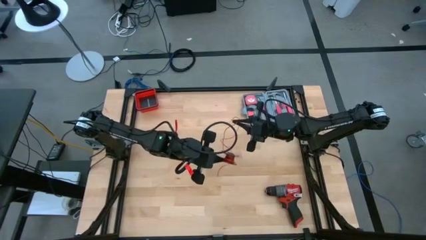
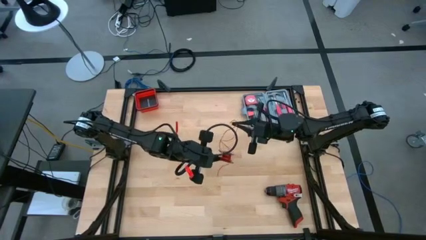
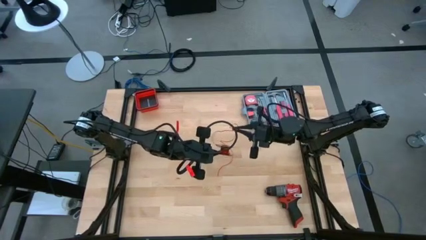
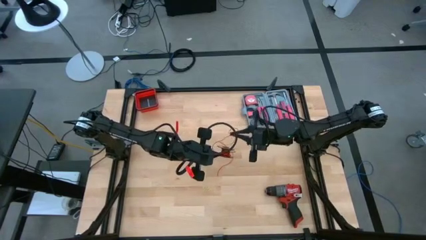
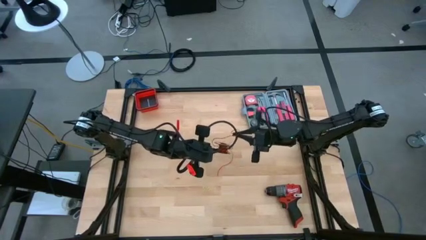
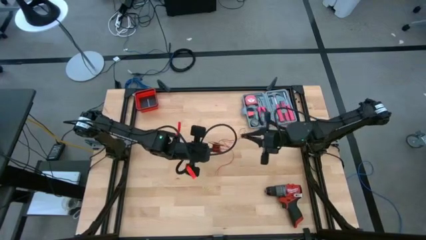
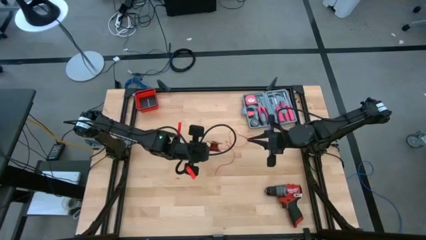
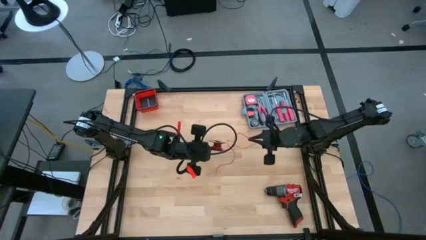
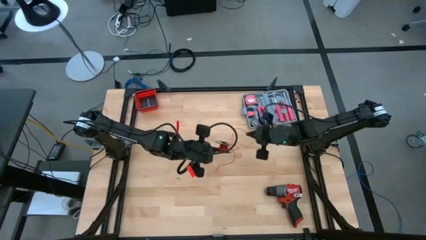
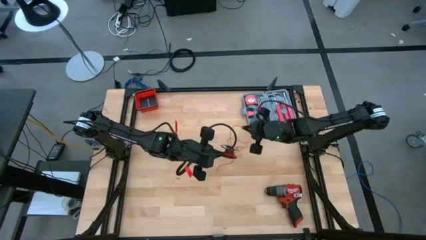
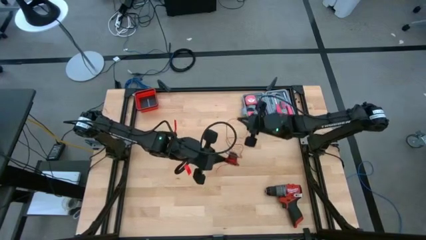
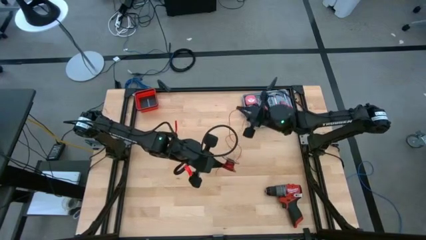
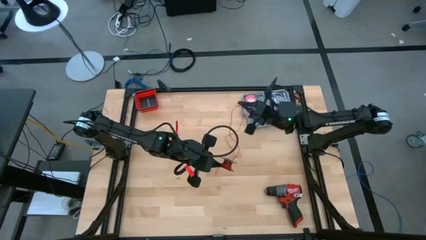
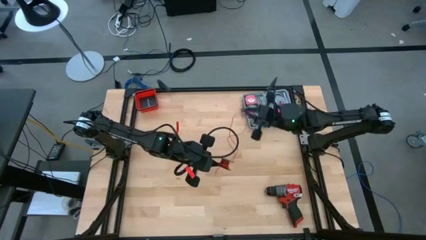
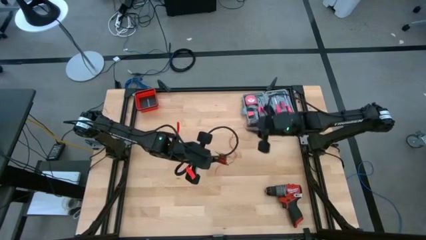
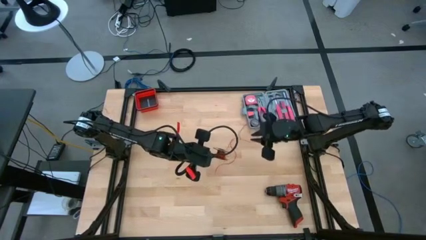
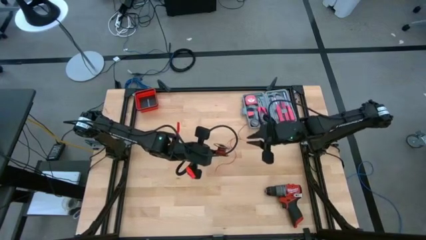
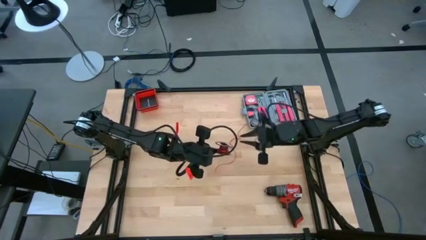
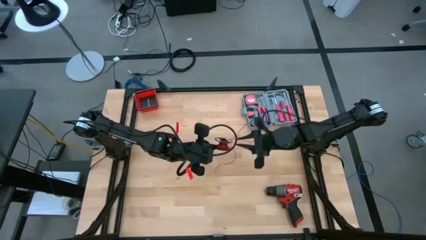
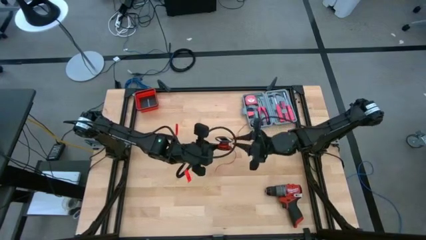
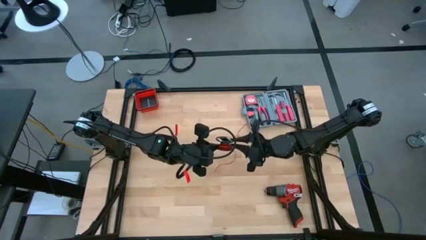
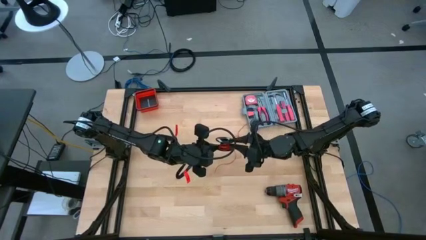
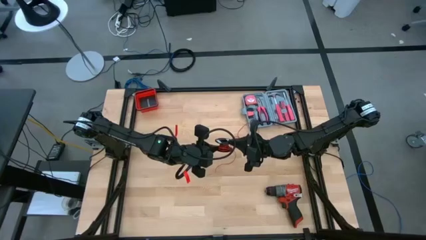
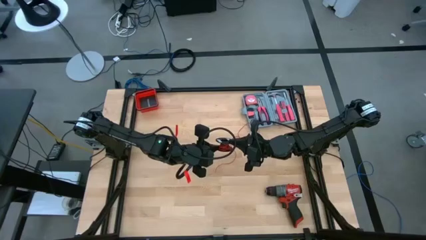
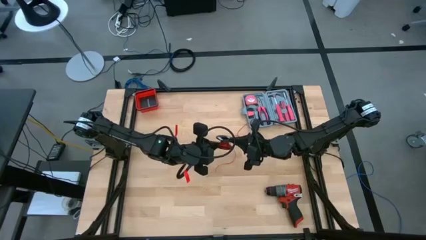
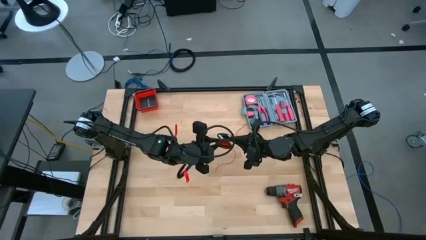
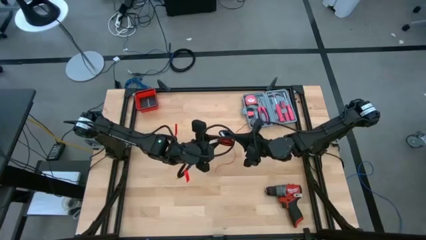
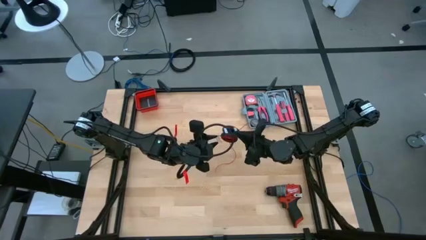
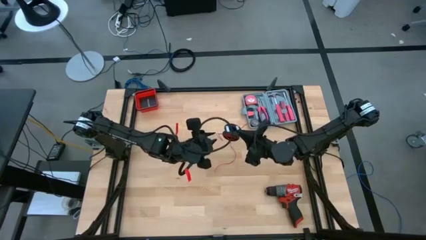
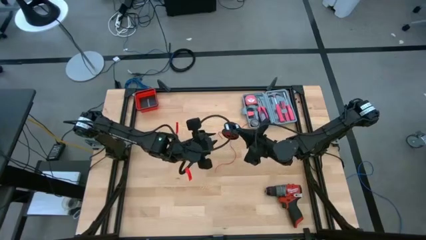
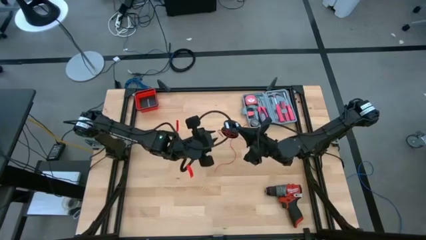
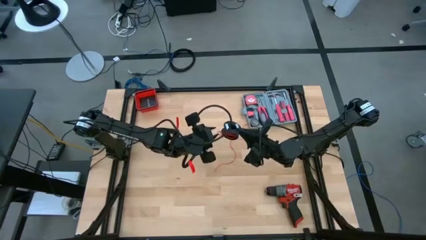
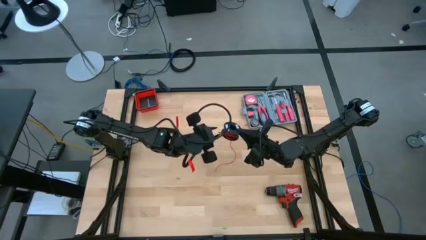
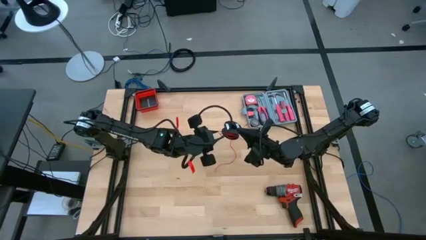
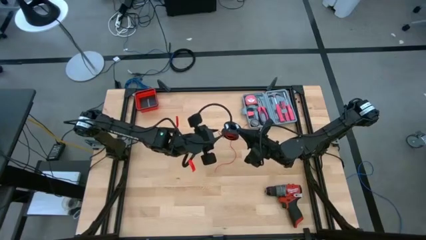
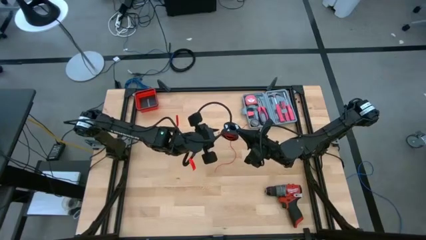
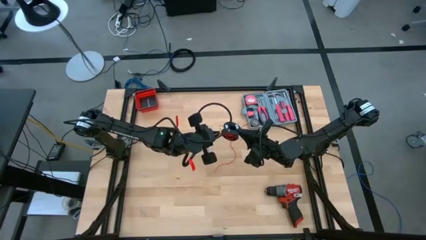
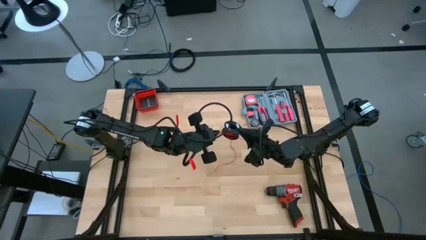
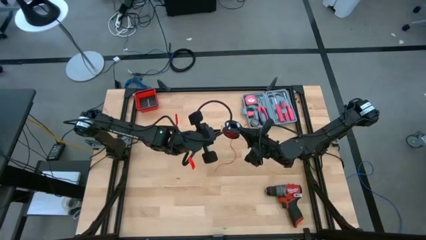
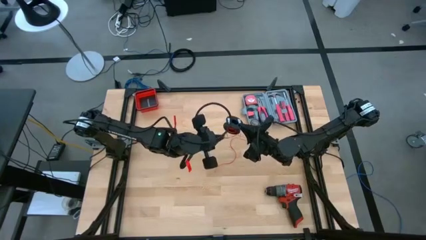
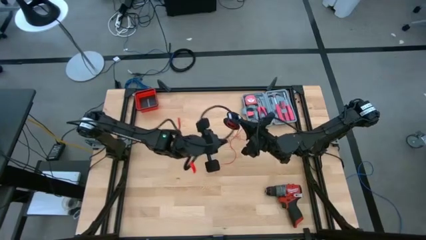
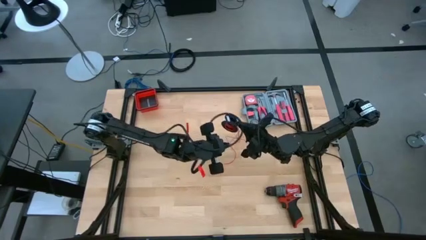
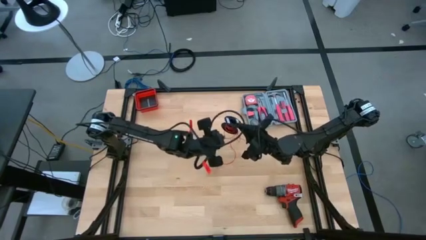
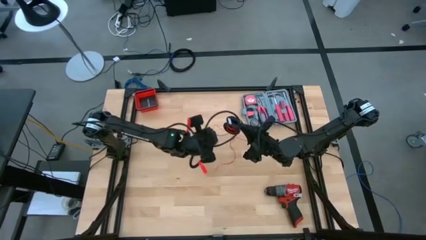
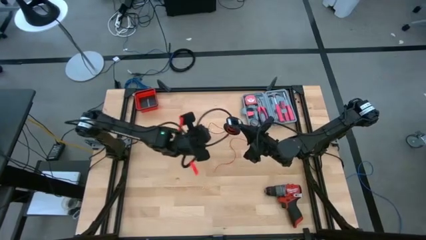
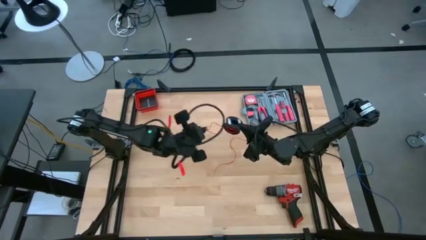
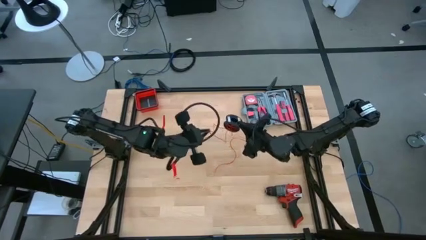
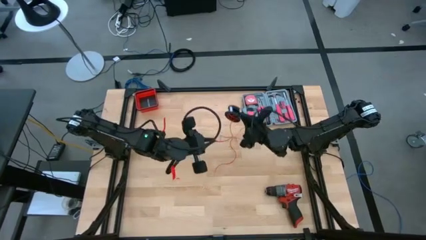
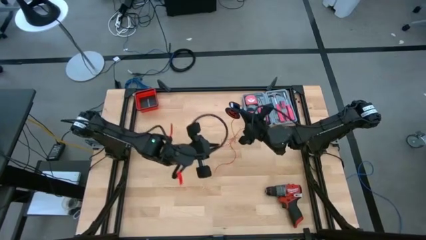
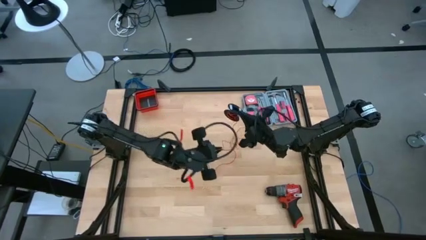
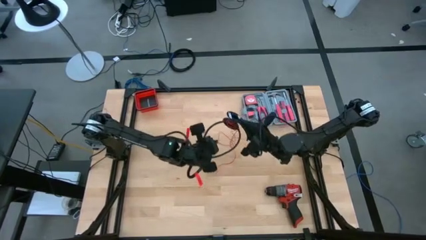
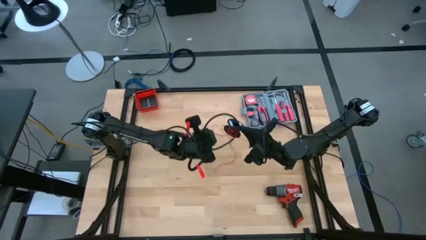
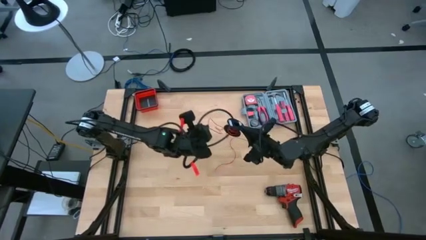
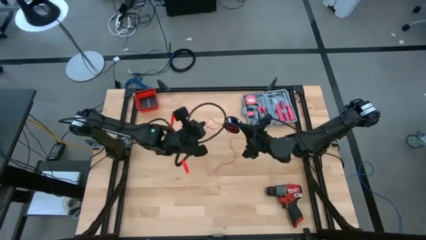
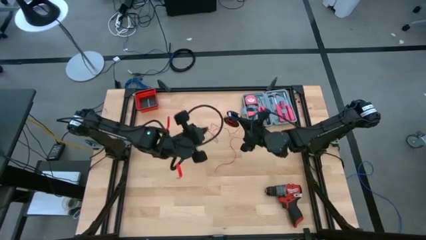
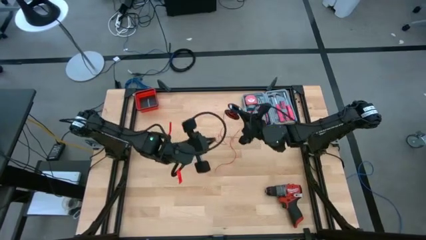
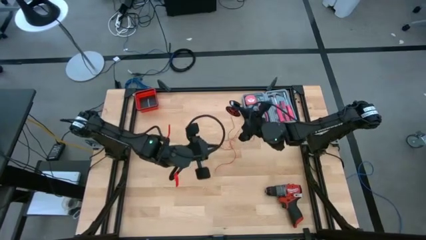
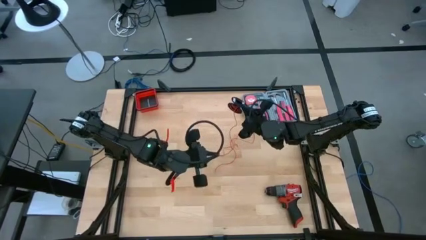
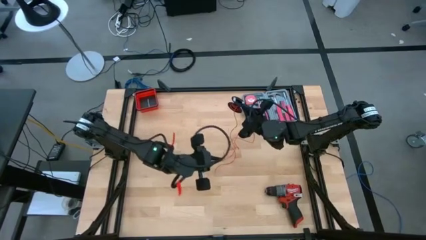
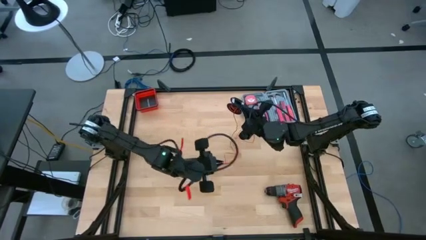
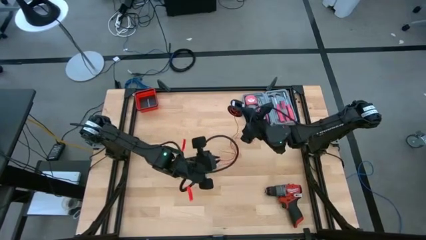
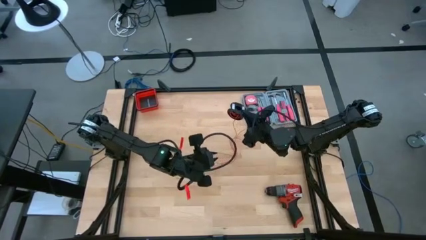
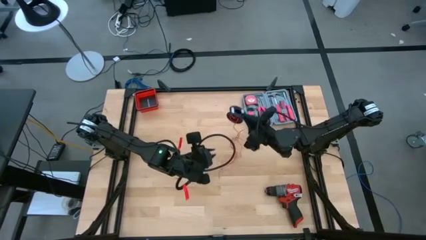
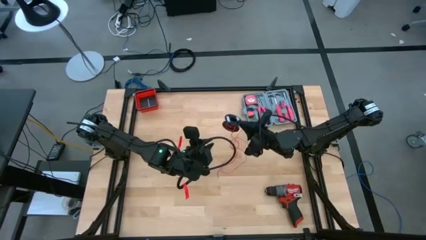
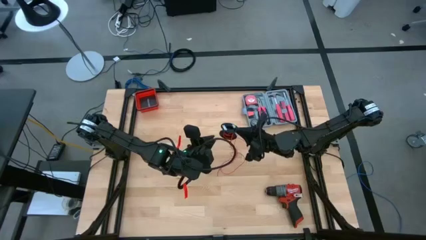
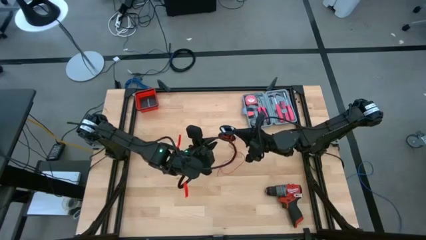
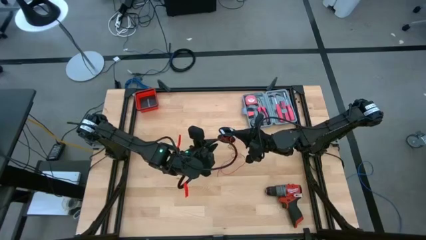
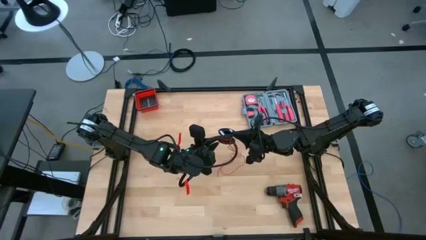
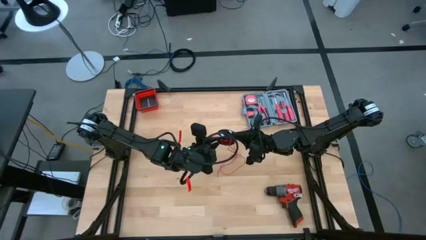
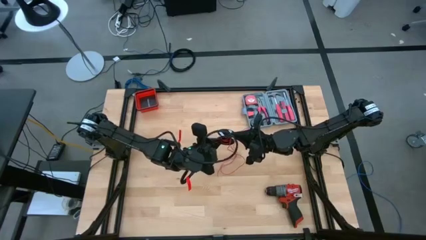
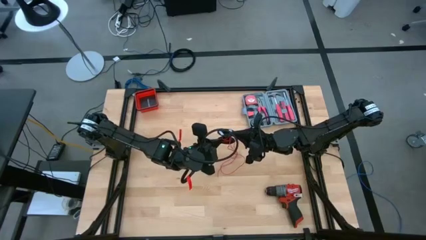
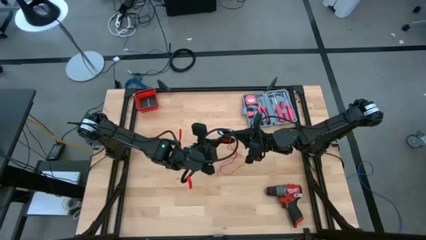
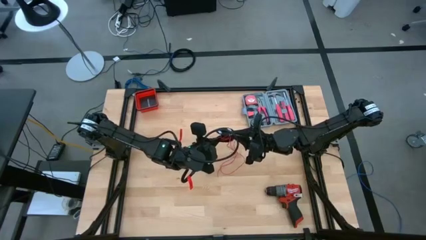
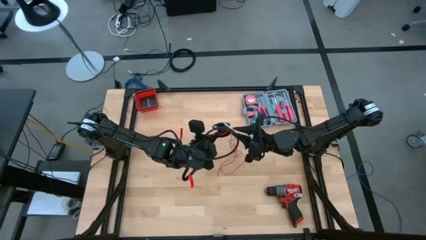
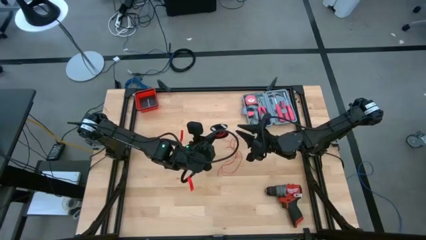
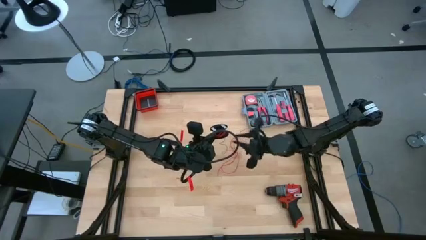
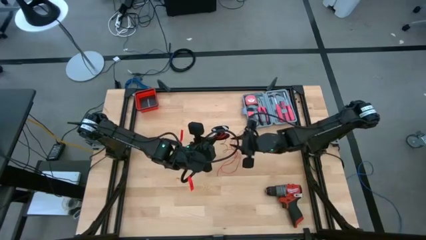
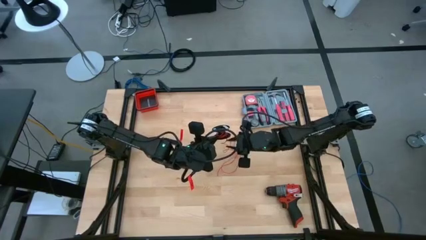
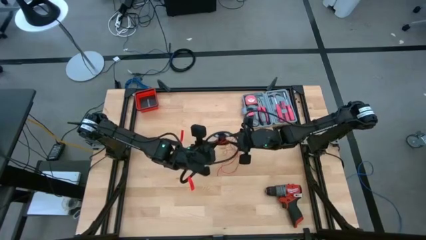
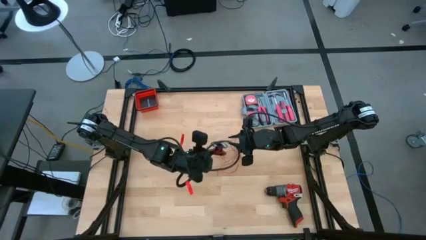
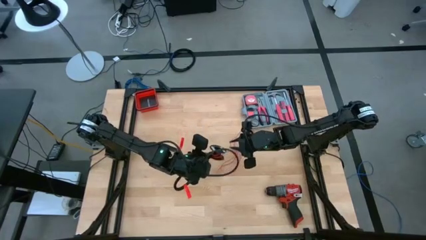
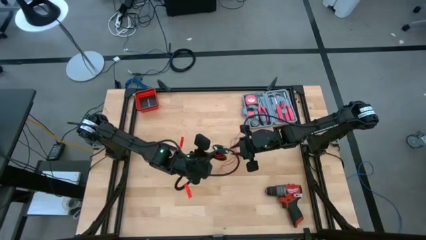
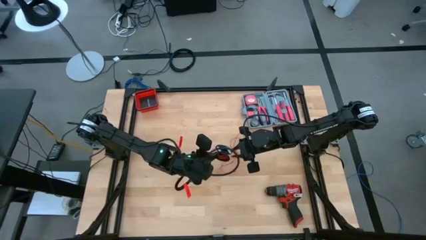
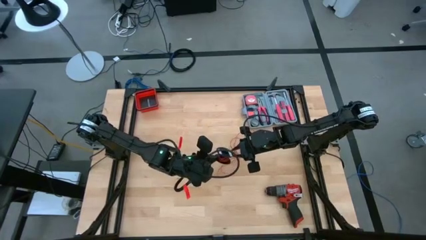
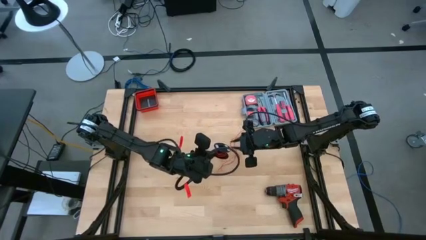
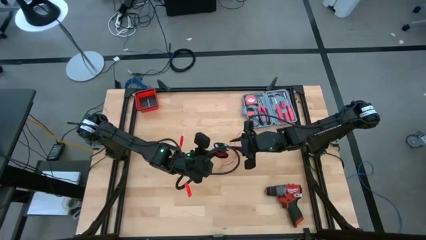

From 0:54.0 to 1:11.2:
Task: Coil cords
Uncoil the red wire from the black spool
